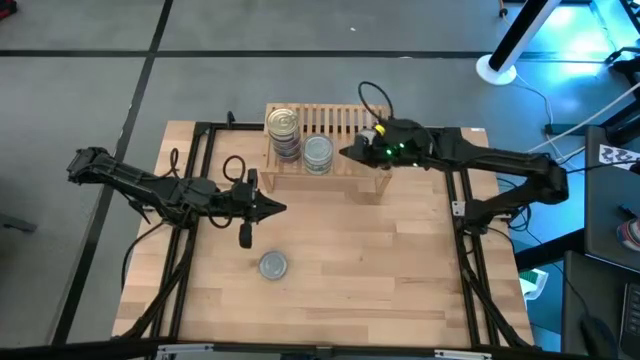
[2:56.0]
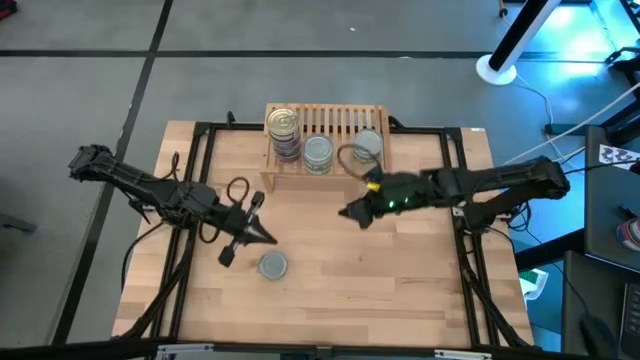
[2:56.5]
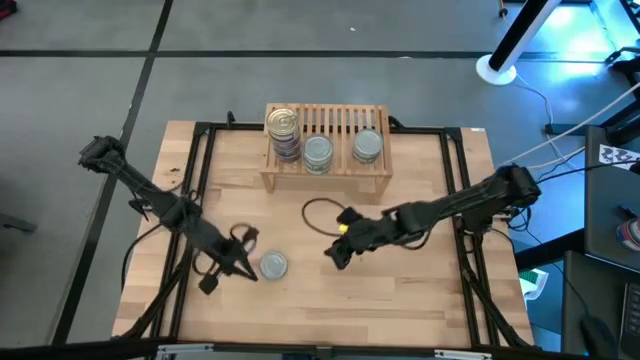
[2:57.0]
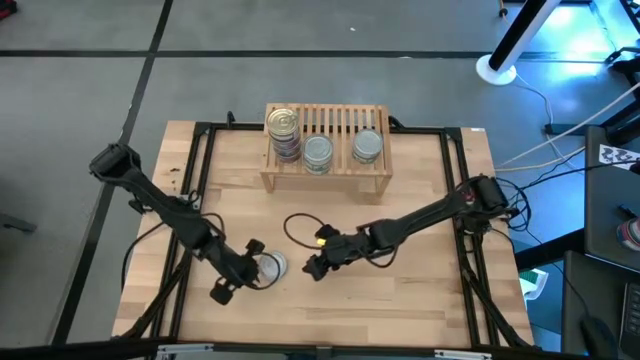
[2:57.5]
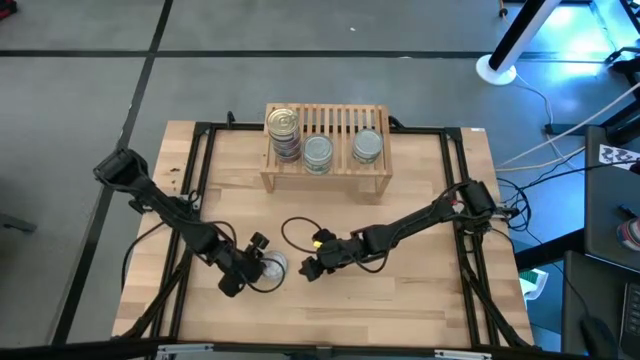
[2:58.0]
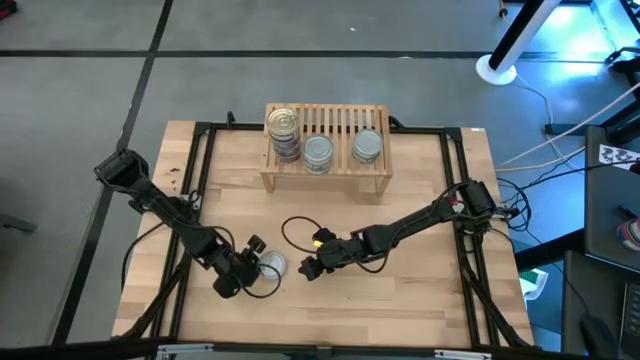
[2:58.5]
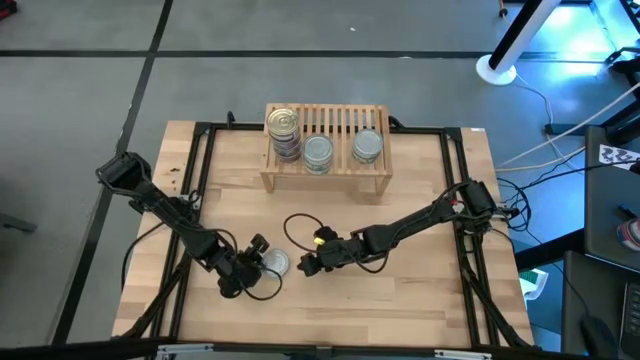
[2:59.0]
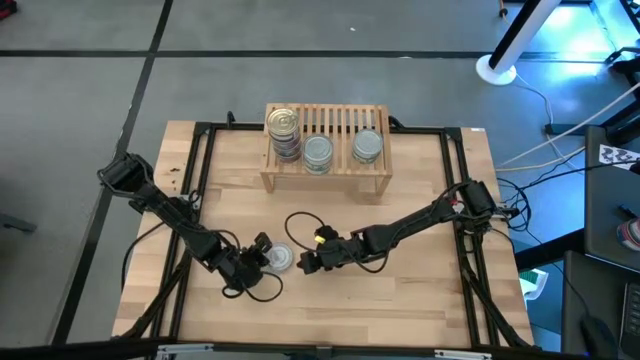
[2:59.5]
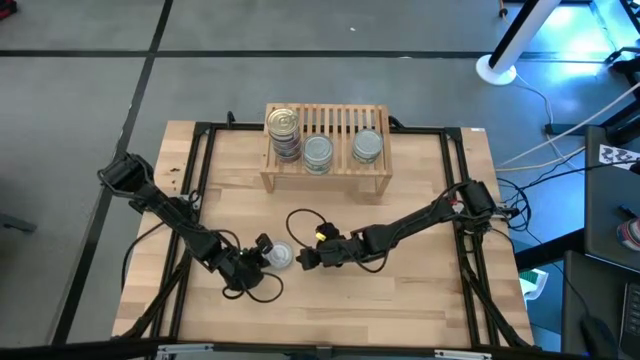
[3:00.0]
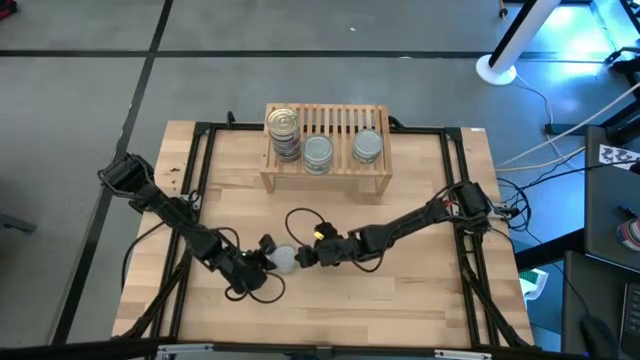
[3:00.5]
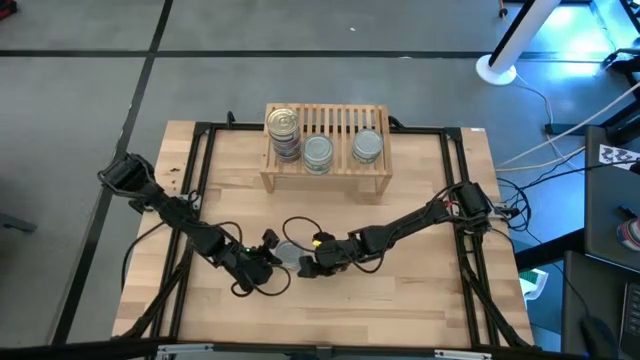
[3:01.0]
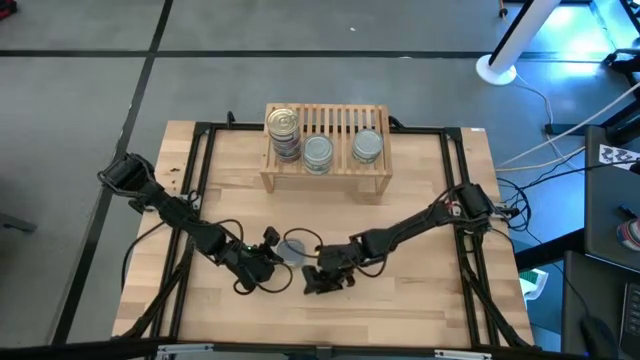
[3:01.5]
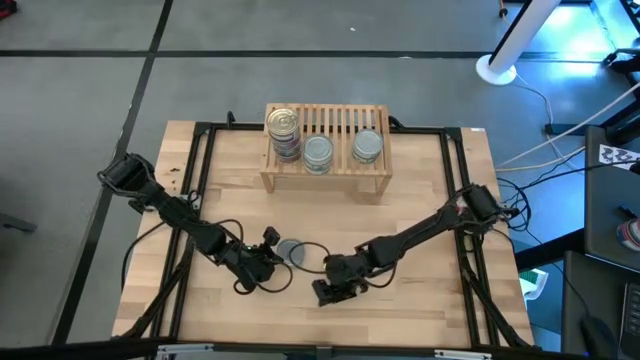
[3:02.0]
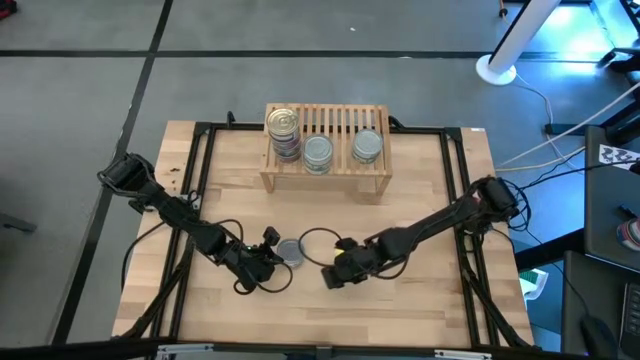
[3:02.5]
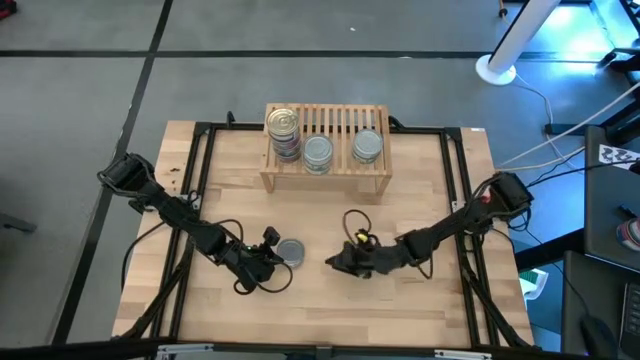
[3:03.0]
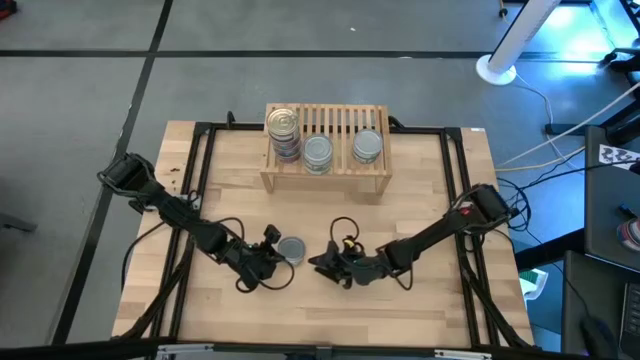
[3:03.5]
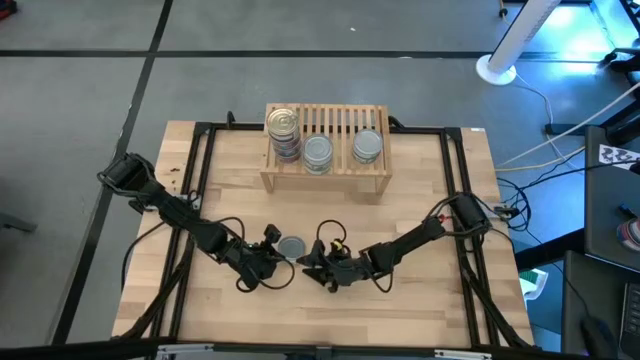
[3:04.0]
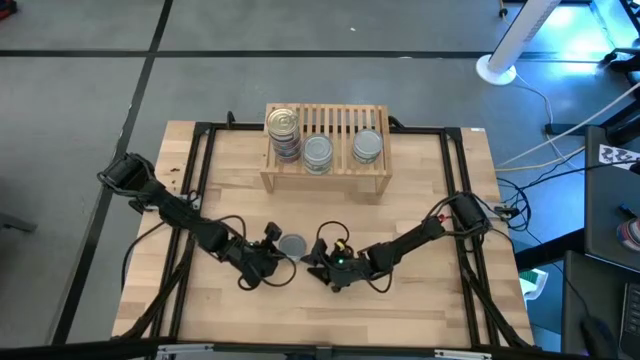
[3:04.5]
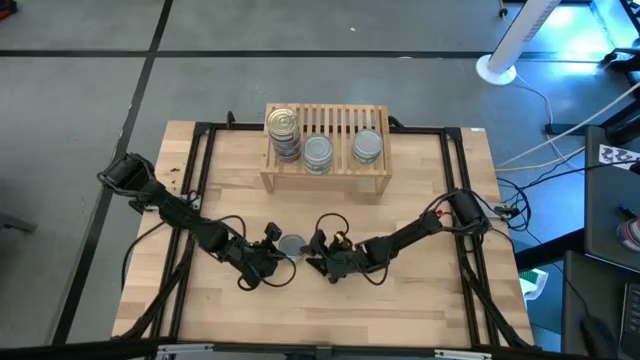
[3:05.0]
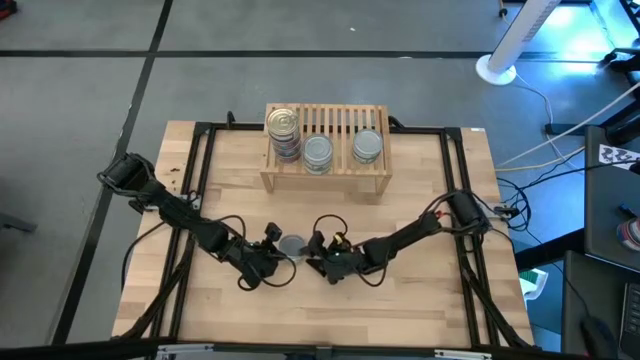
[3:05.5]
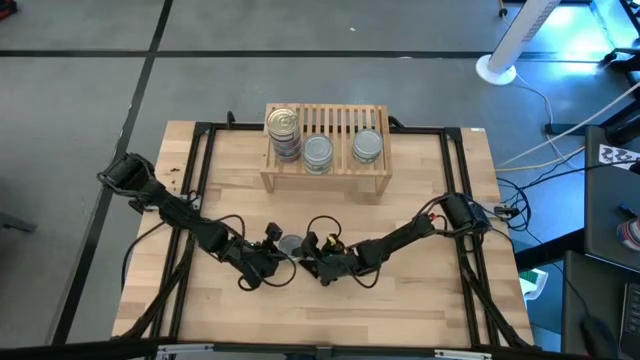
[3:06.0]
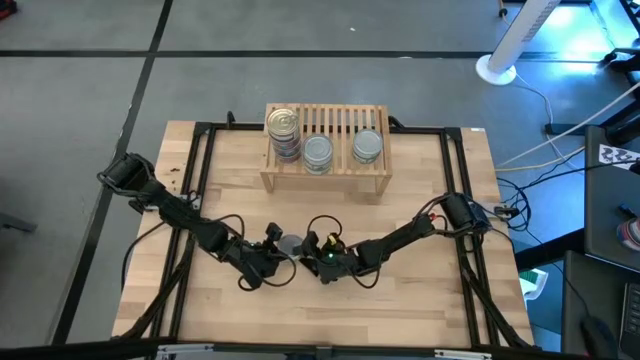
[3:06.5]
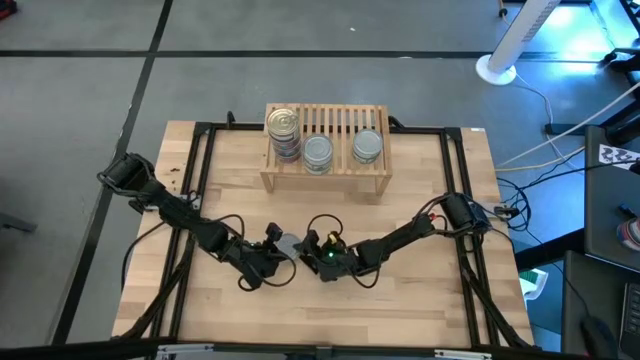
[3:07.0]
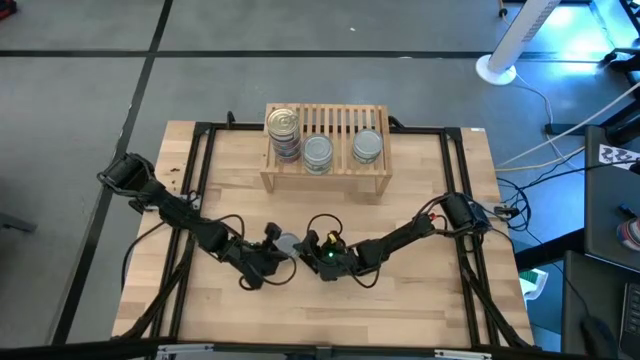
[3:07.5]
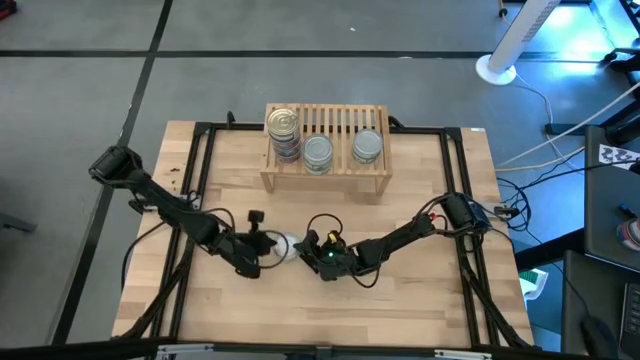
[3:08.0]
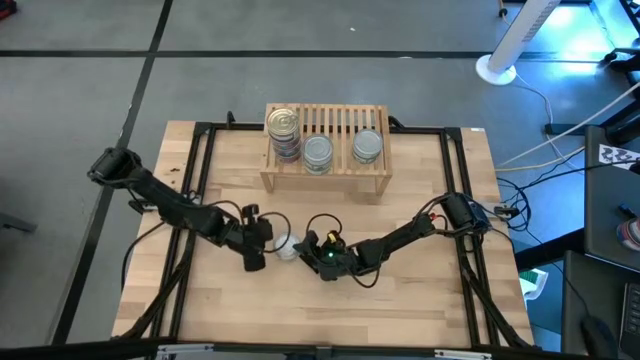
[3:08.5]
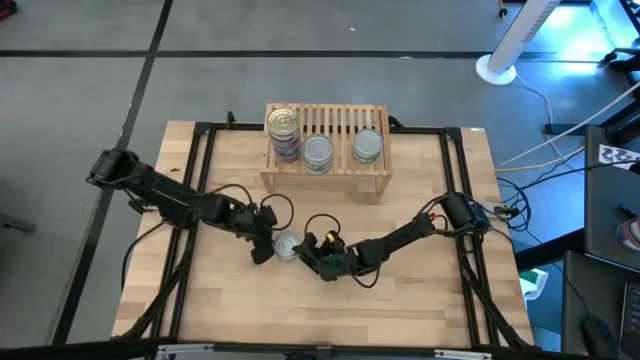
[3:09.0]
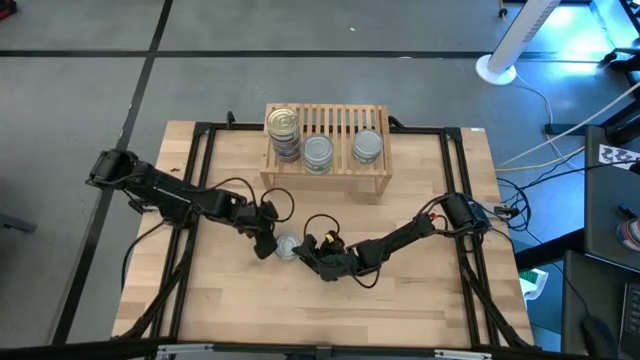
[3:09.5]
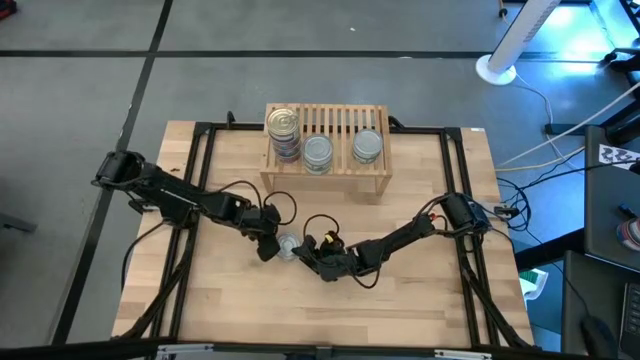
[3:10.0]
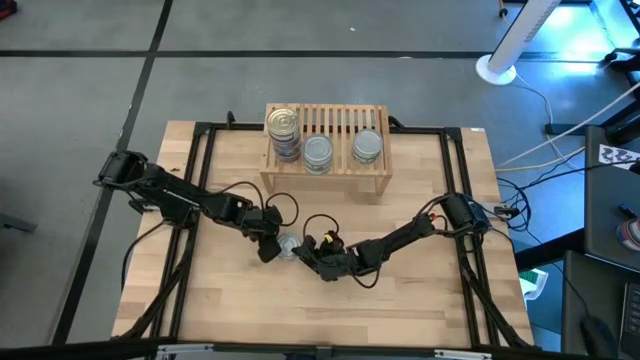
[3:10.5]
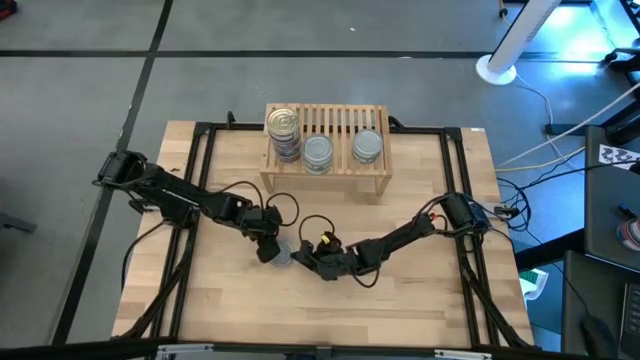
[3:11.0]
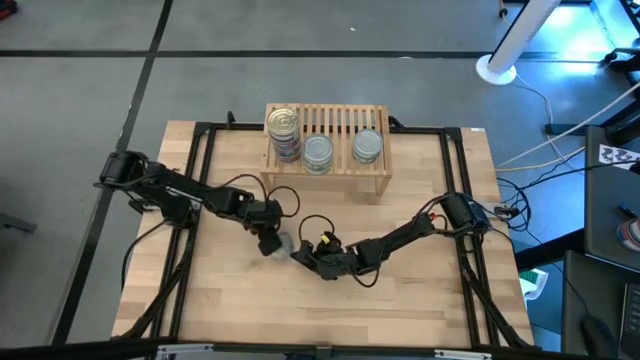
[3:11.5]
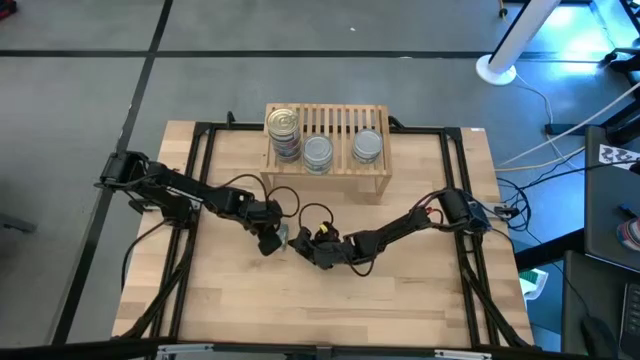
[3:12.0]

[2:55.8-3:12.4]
Task: Stack canned seafood by type on shelf
Stack the green tuna can on top of the other green tuna can on the shelf

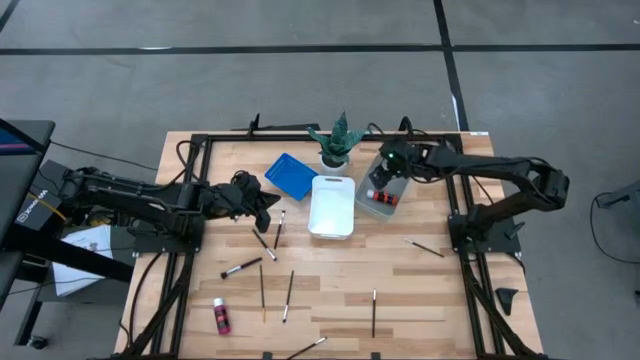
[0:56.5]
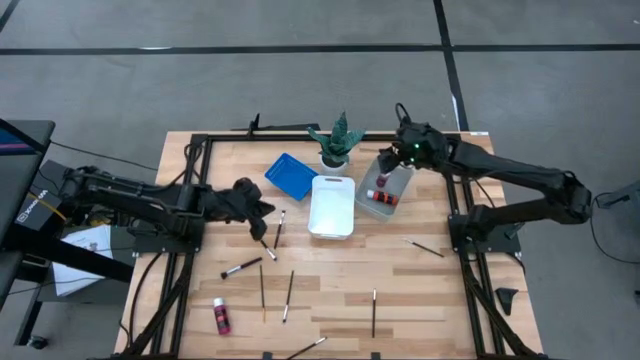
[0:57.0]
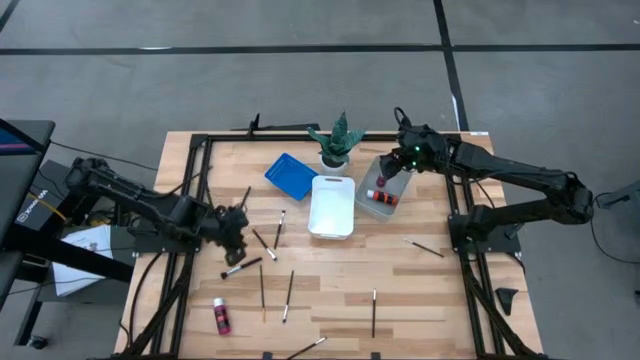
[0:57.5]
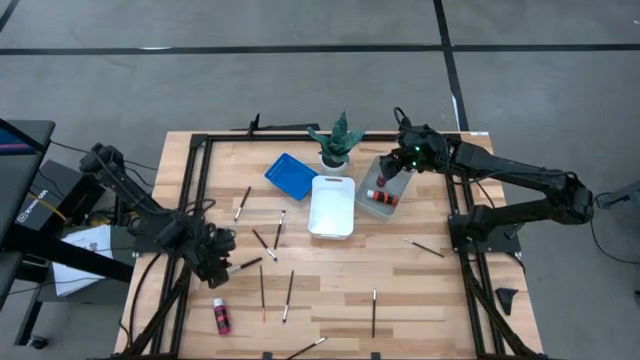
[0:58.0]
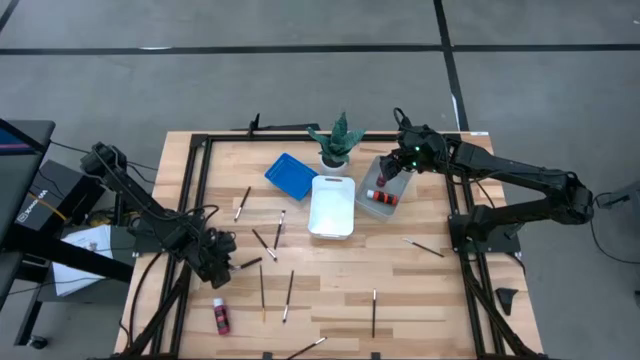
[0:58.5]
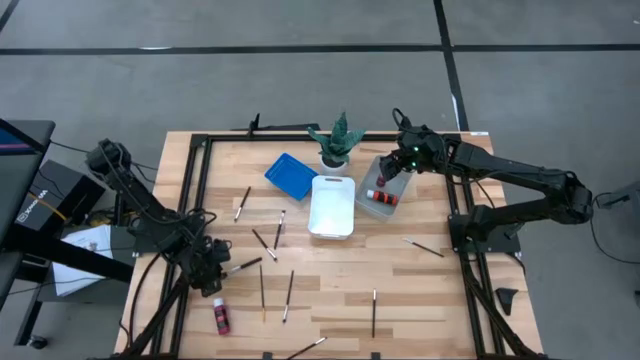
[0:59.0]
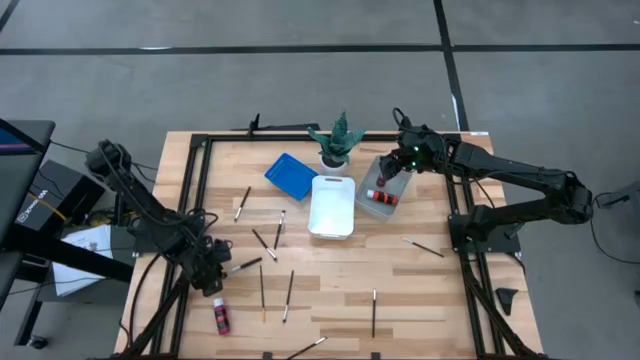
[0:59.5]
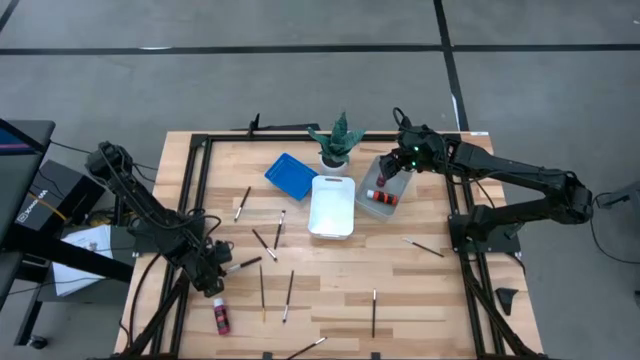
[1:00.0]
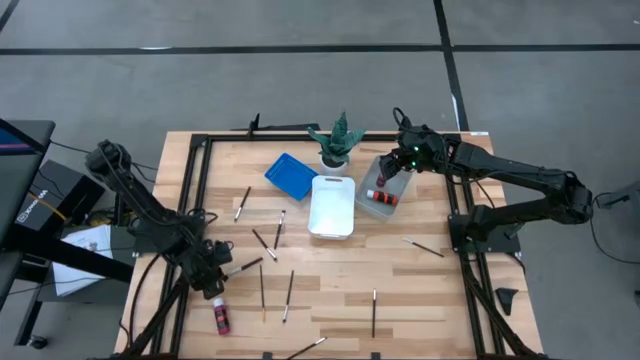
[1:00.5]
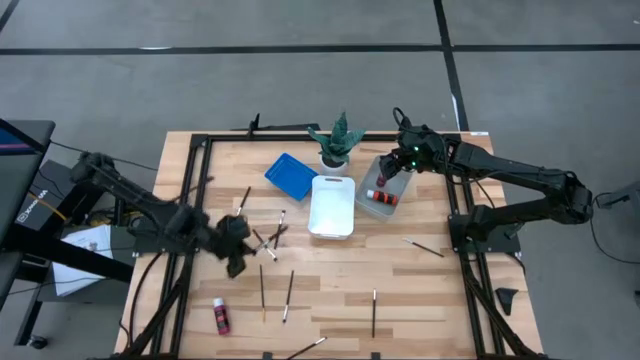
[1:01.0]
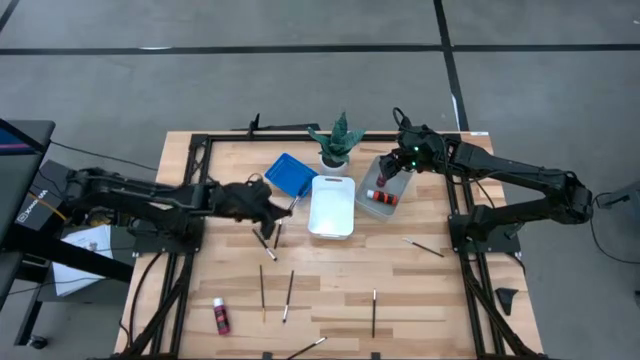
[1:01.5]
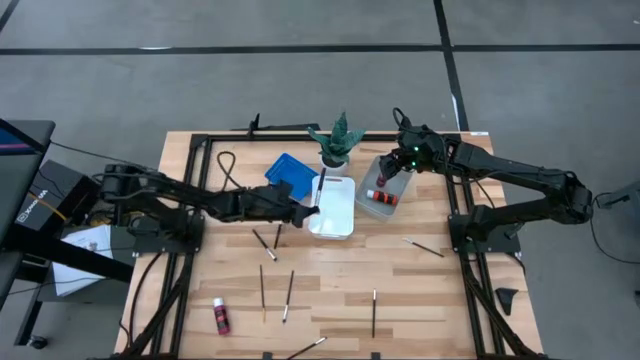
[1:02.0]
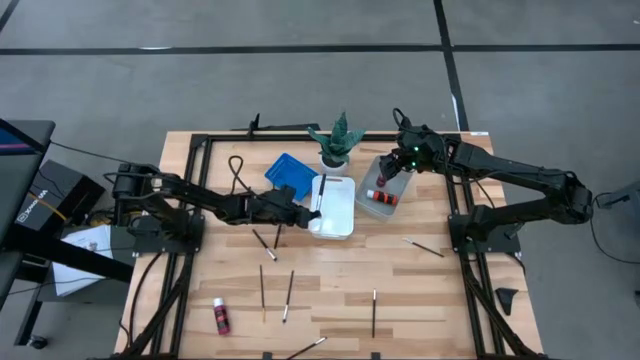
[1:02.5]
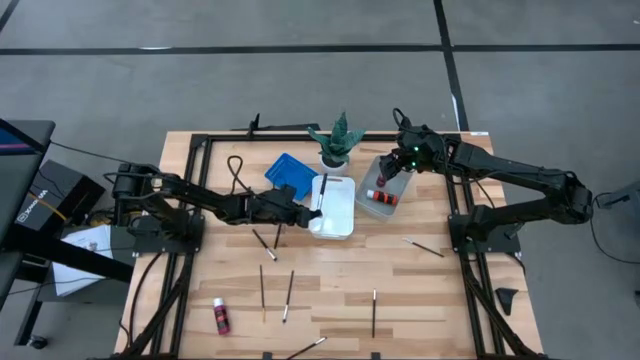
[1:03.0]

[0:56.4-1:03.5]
Task: Pick & Place Paint Supplies
Put the large black paint brush into the white bin
